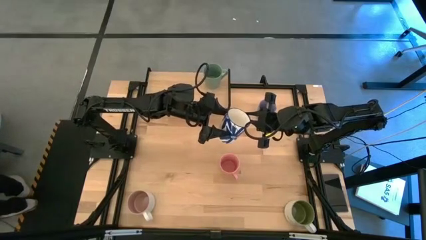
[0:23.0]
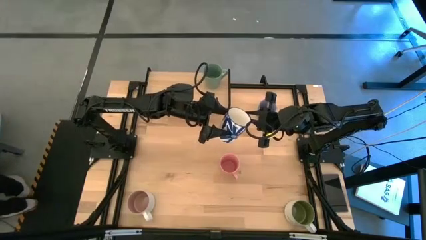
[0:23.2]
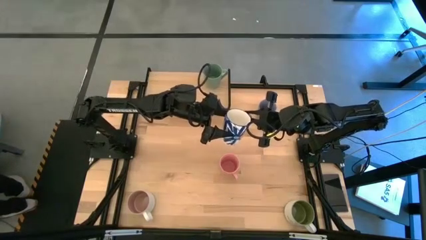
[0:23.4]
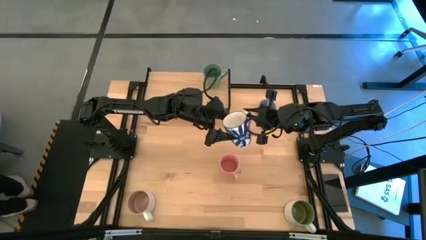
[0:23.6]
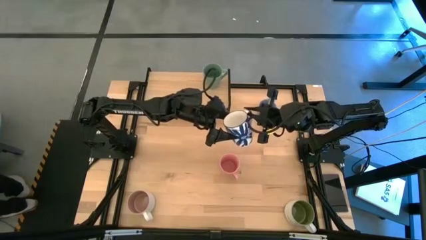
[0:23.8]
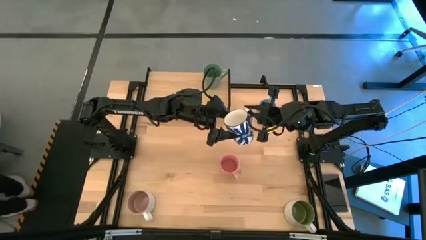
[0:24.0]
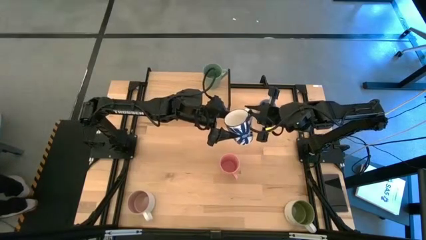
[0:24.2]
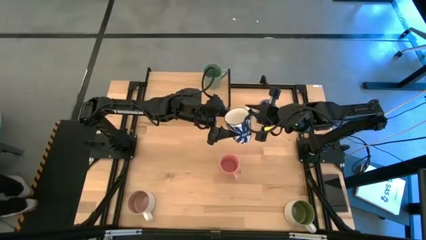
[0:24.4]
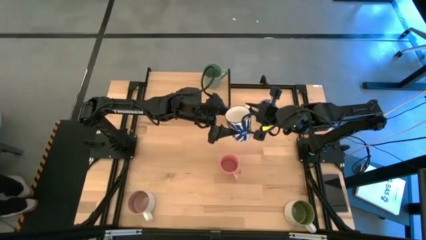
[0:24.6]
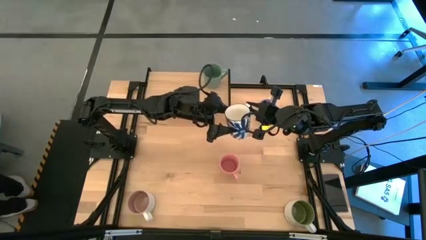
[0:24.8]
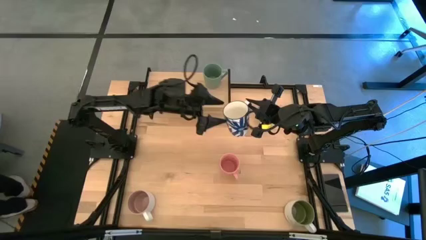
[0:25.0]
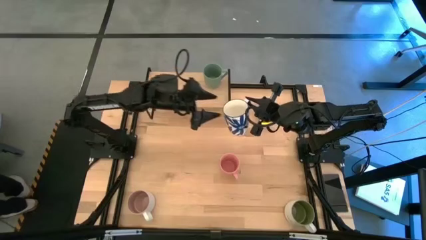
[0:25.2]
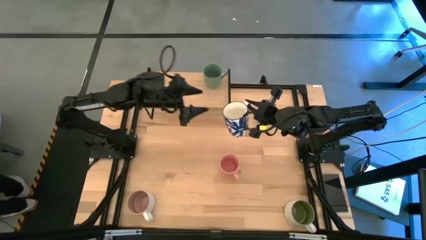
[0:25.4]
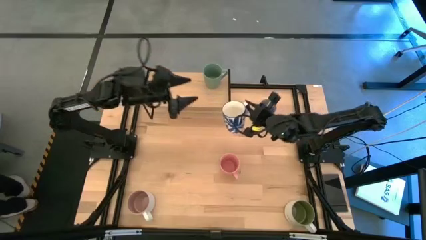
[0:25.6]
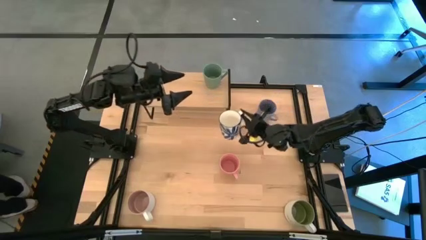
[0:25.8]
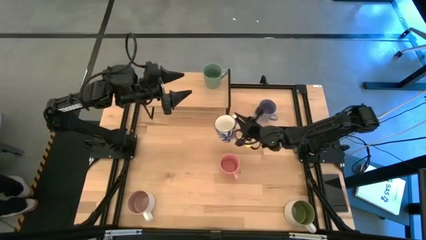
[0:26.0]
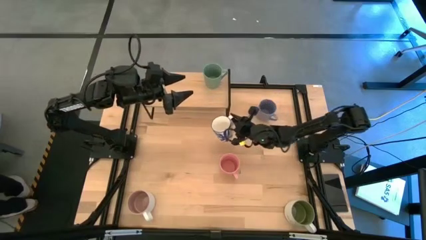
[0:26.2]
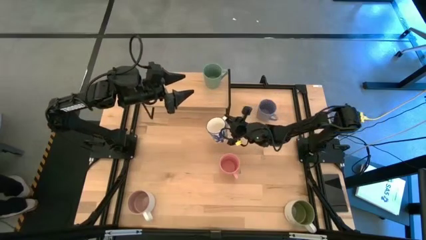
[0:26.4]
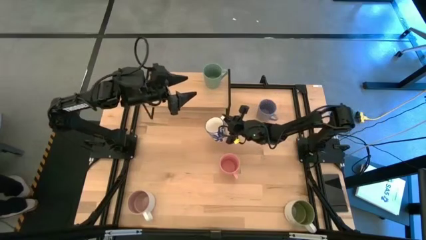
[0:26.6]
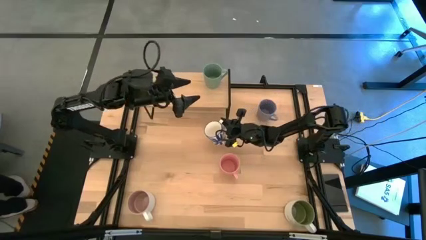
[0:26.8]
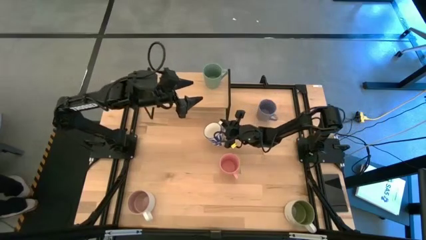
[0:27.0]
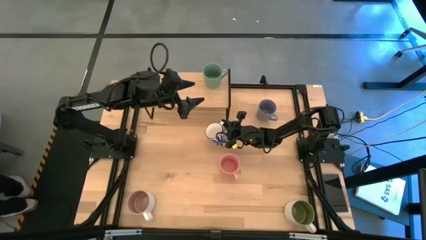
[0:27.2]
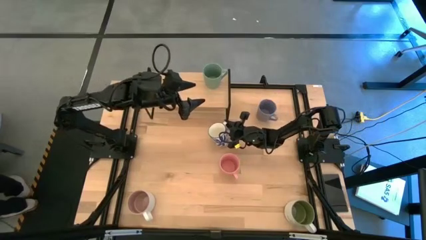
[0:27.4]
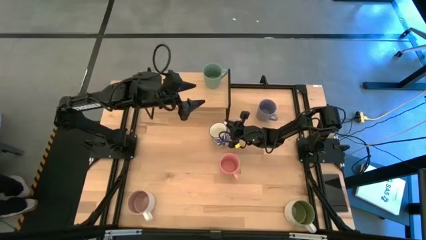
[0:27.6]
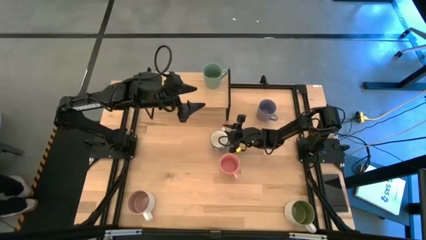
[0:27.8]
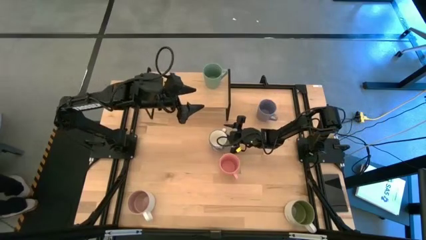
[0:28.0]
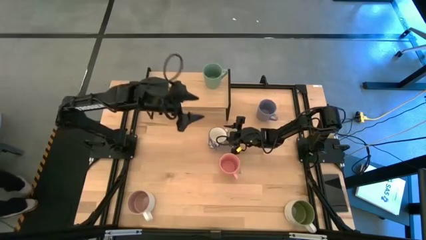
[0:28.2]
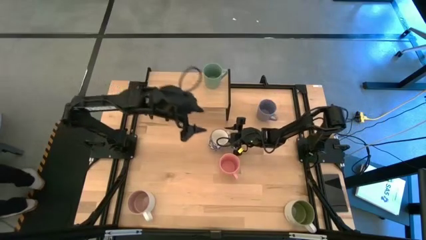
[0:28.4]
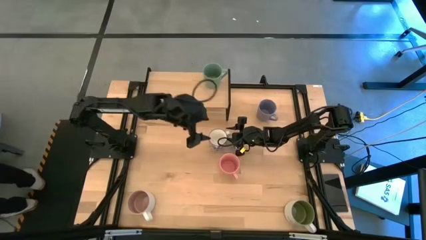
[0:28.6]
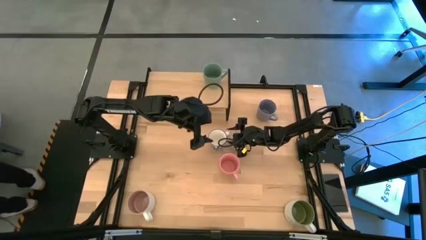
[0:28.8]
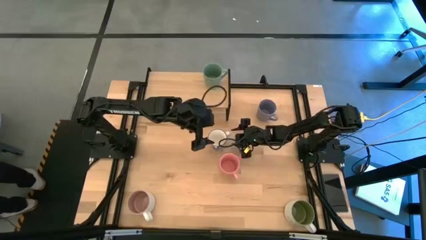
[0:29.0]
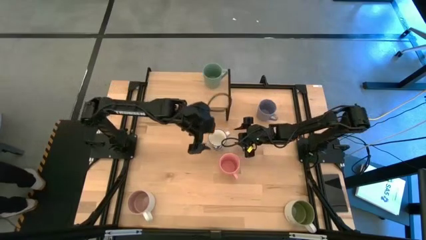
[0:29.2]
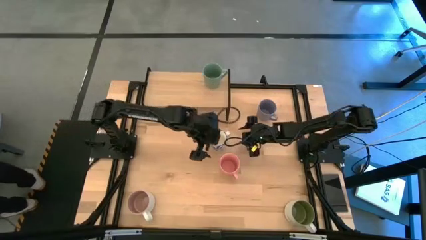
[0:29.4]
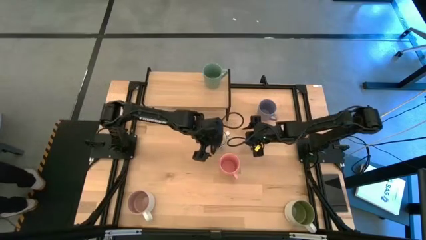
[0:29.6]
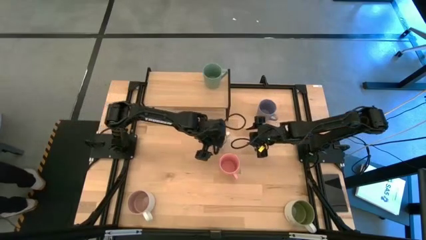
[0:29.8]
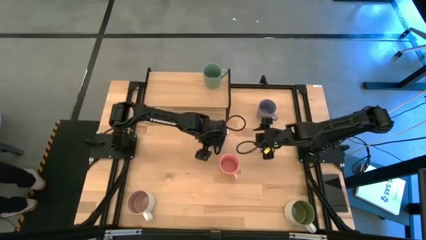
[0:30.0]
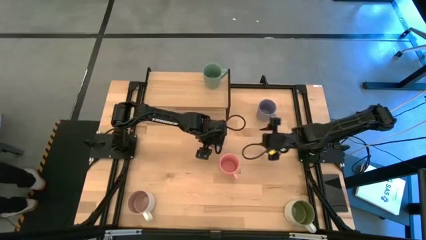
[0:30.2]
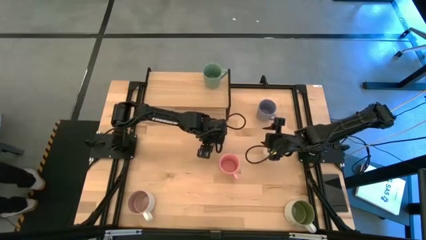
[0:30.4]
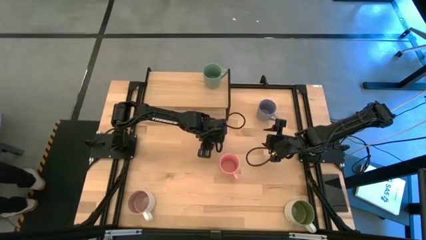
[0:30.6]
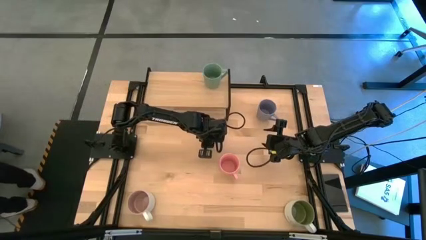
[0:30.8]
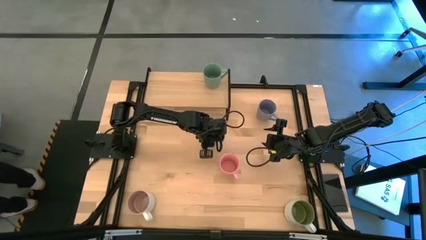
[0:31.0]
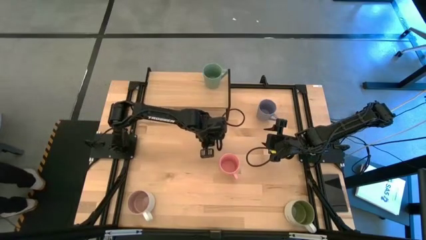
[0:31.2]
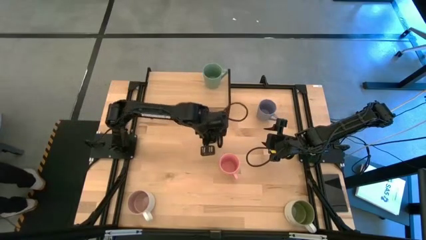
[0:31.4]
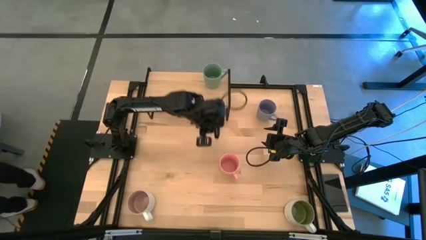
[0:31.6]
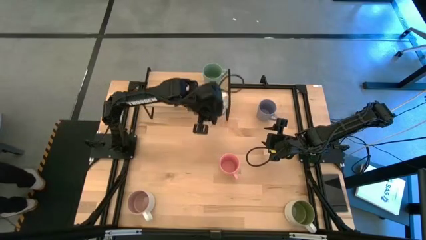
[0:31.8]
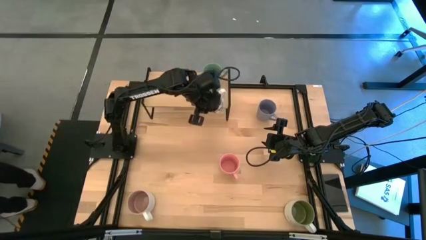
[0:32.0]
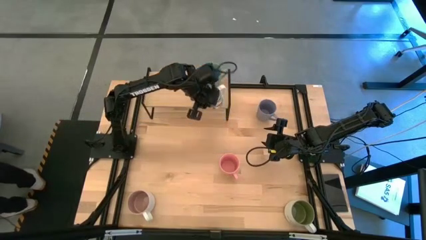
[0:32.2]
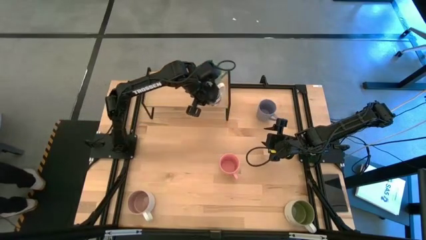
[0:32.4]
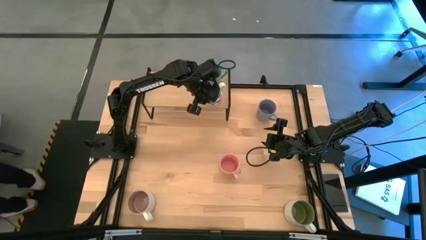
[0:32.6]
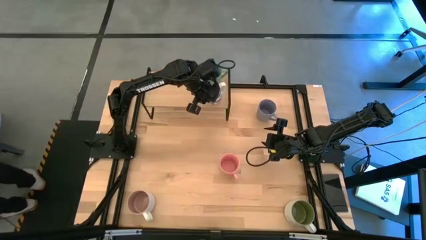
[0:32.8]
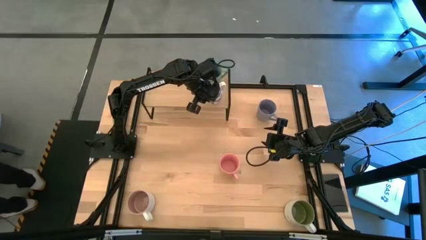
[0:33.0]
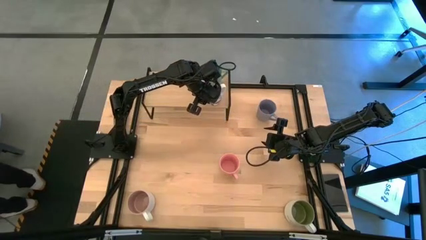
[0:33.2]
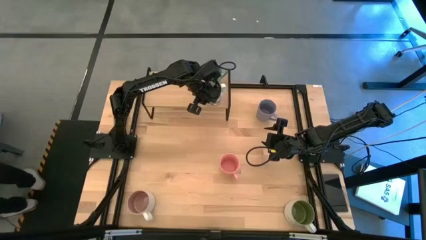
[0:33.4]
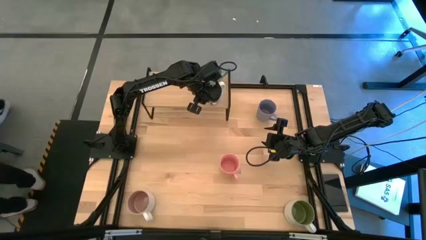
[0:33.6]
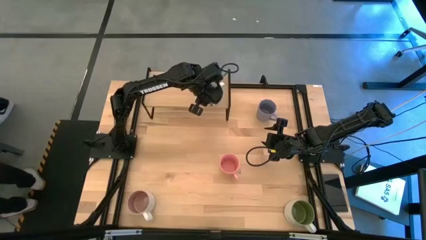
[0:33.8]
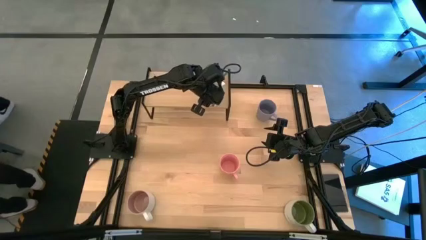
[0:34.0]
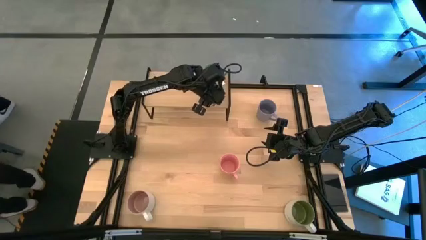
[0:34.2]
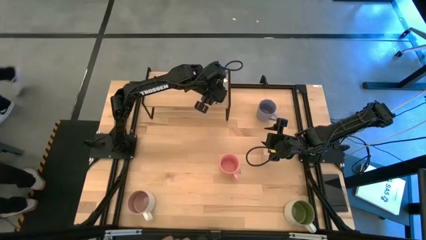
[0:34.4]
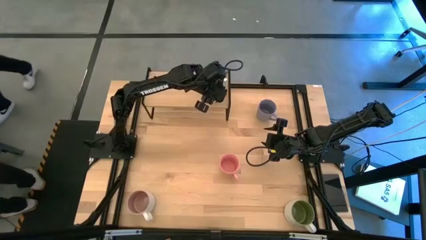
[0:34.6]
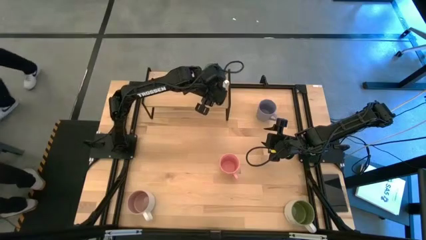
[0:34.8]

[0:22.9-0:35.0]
Task: Place coffee mugs
Put the white blue on the shelf

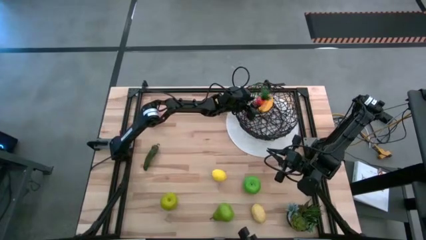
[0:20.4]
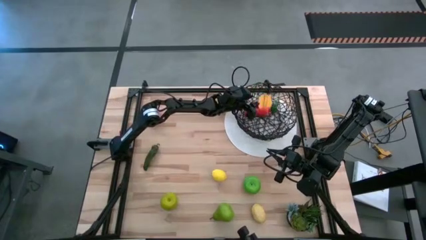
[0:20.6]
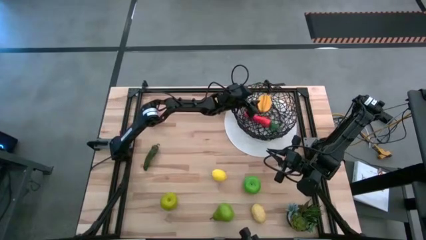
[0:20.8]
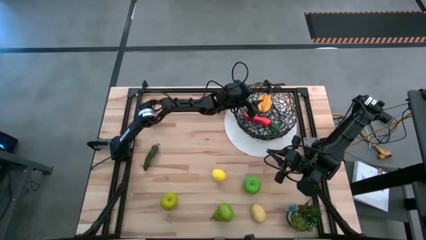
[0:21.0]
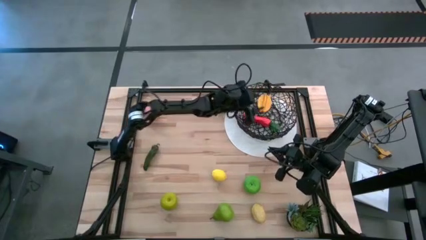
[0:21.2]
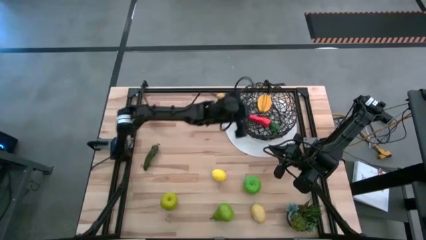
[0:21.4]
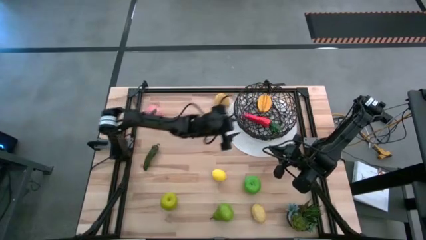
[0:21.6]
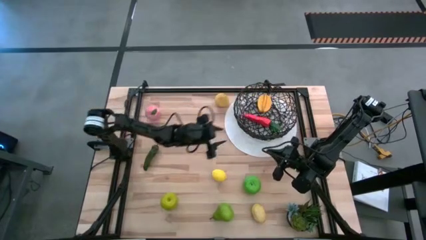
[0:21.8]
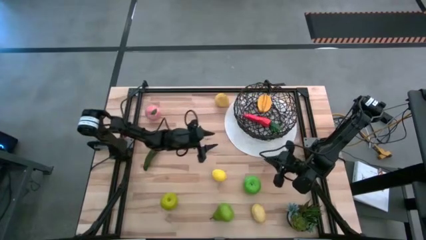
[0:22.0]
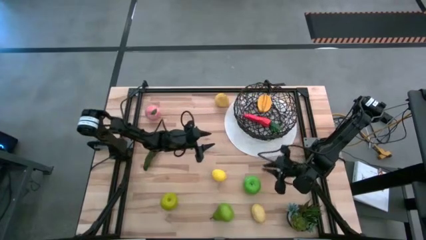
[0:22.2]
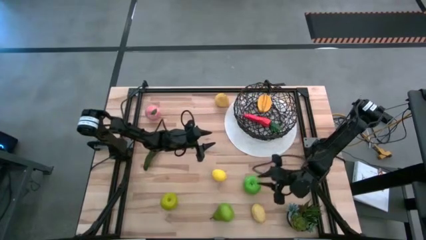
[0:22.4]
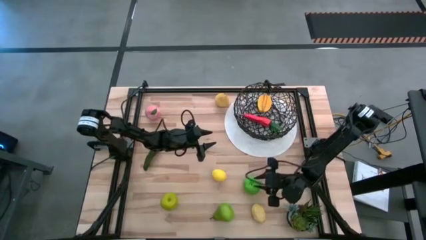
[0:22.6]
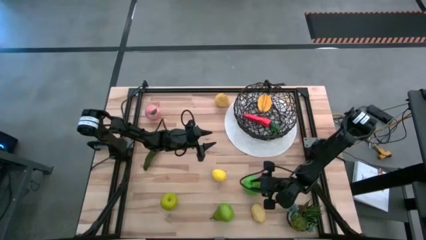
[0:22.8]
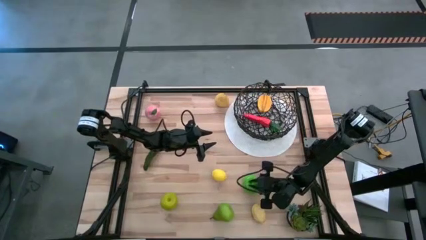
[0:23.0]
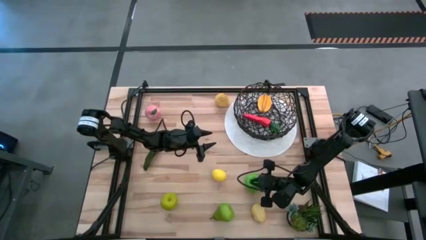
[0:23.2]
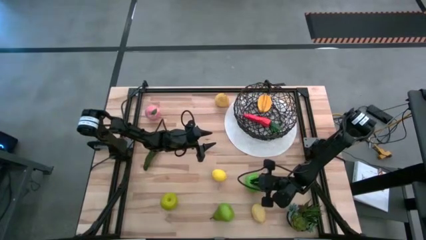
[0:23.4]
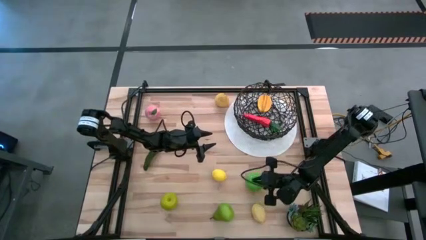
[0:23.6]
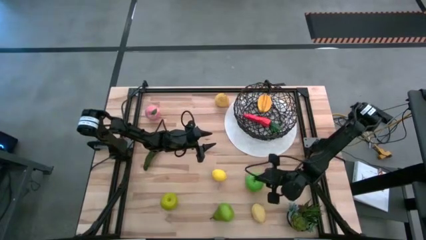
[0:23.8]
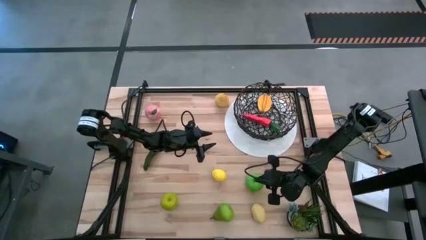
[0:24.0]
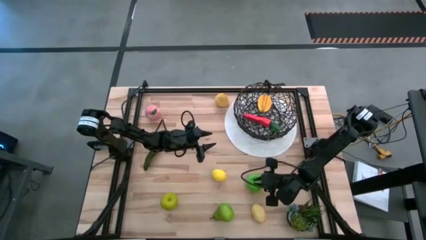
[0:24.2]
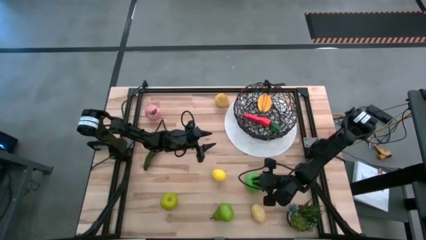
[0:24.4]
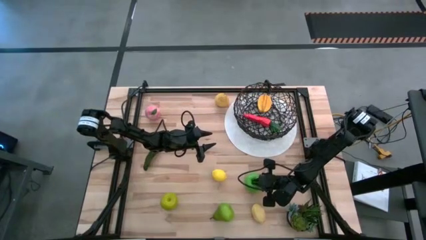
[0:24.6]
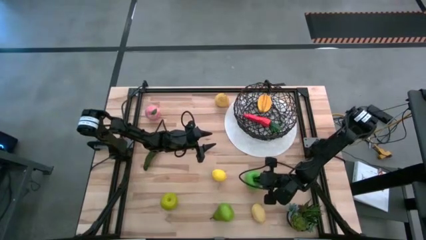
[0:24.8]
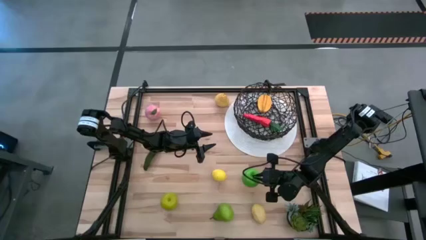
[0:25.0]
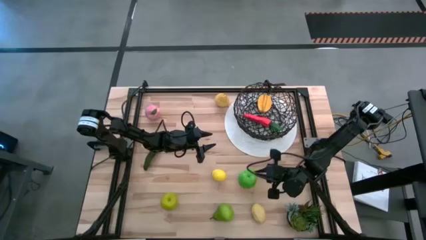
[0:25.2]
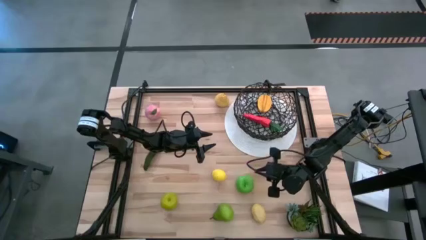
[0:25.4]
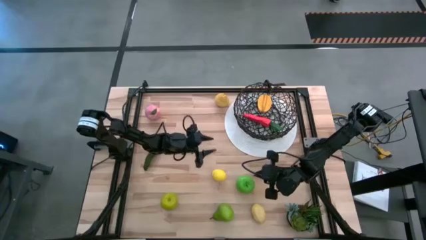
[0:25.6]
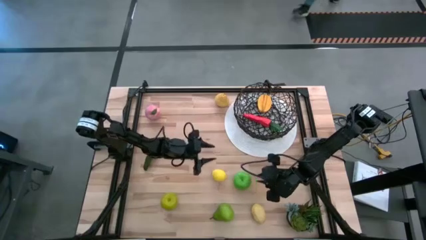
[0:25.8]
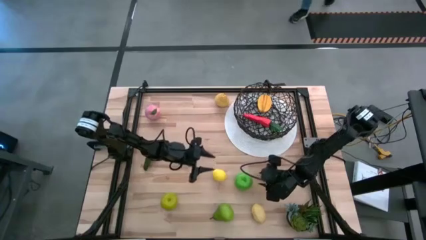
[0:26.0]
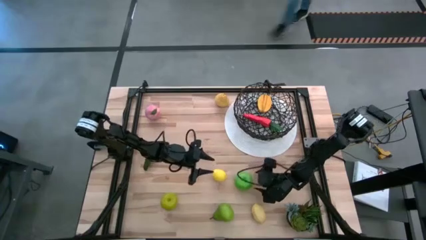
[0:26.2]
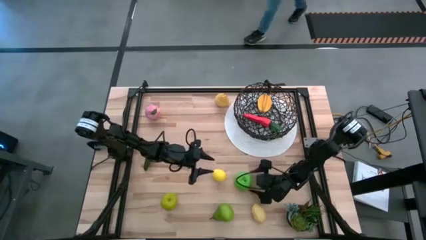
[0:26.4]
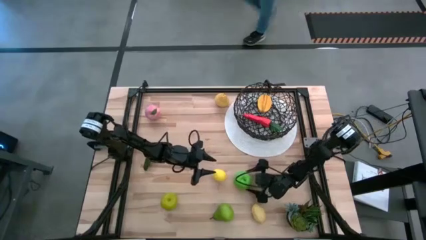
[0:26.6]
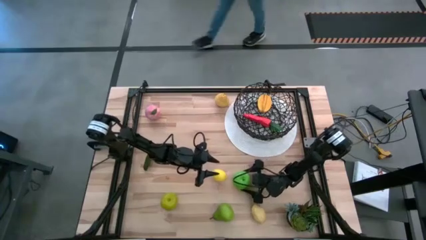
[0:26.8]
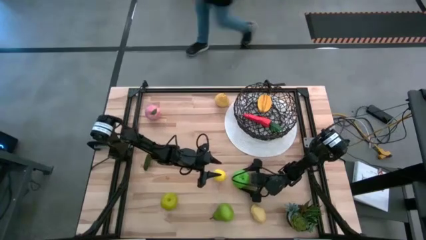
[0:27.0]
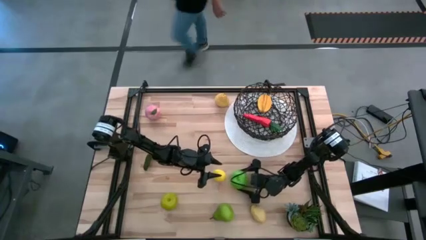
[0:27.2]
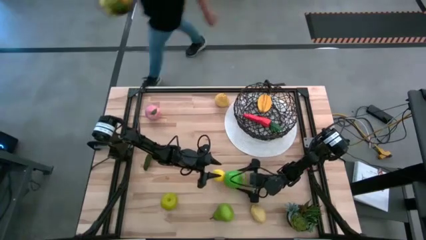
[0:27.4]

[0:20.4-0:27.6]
Task: Build produce basket
Put the green apple into the black wire basket
